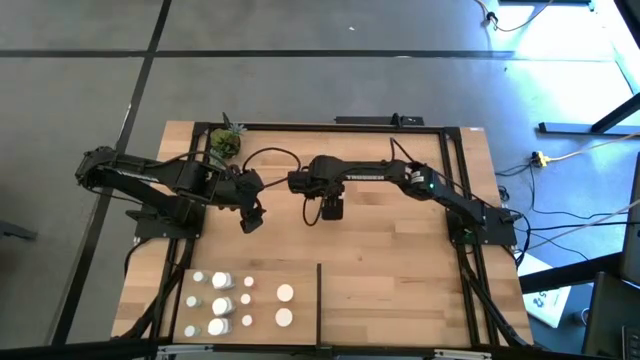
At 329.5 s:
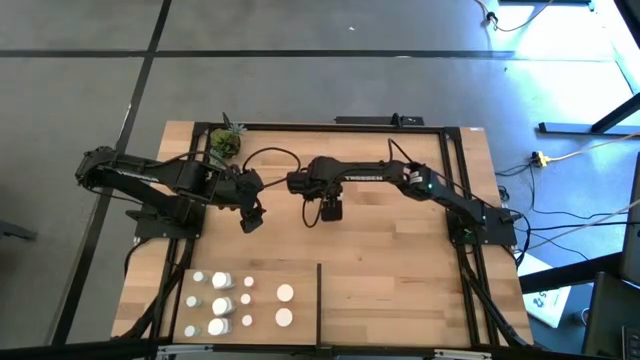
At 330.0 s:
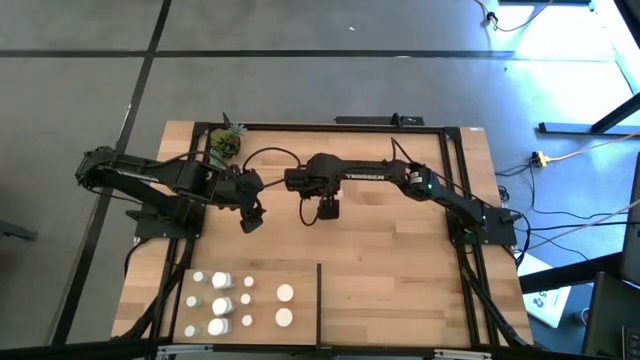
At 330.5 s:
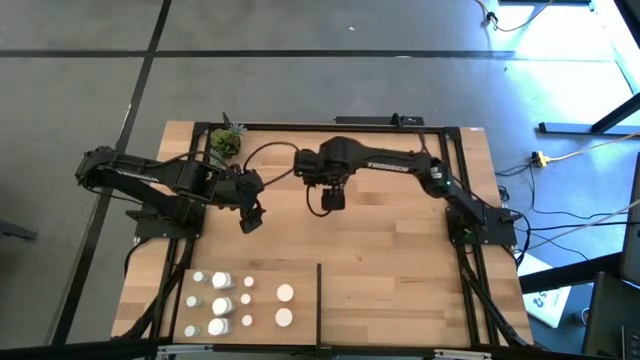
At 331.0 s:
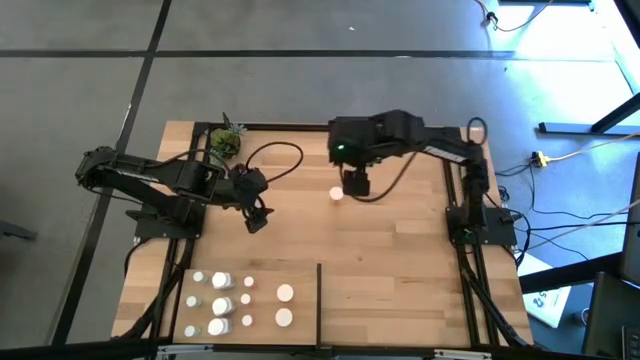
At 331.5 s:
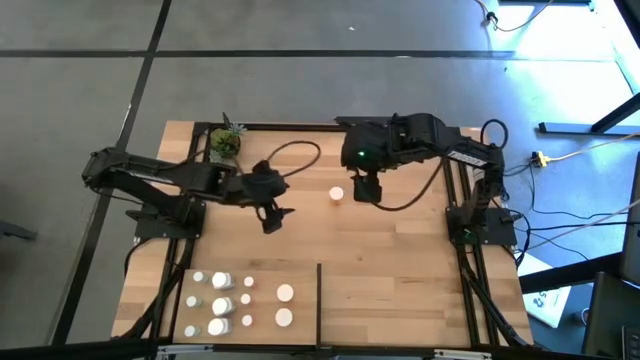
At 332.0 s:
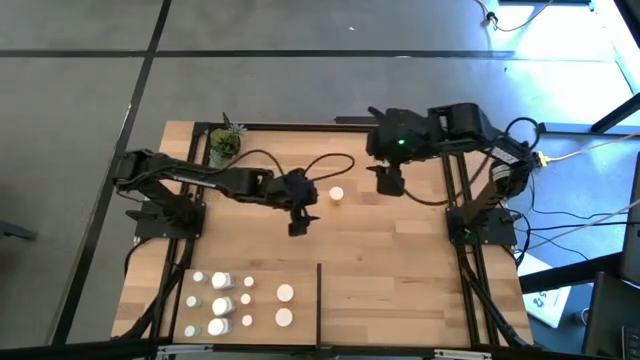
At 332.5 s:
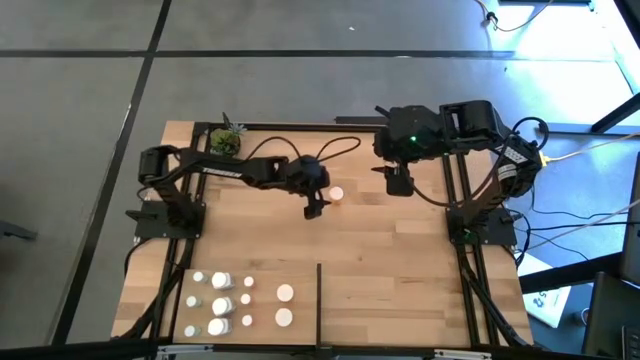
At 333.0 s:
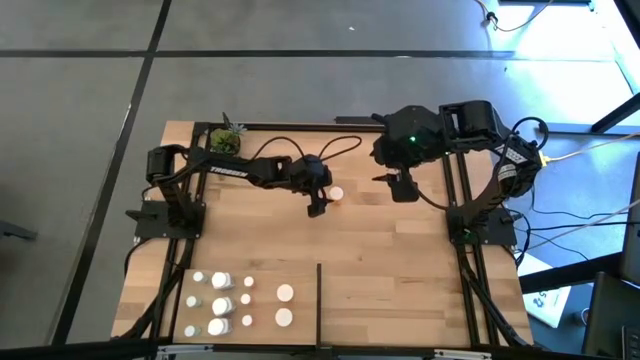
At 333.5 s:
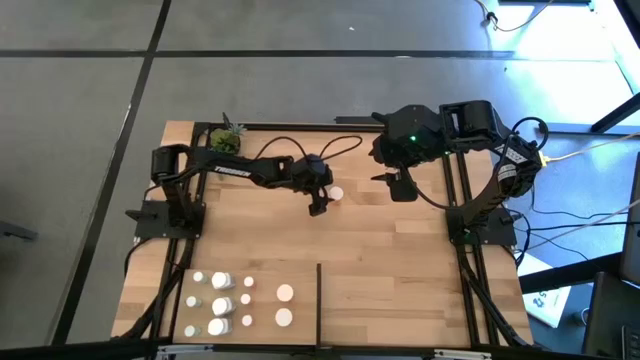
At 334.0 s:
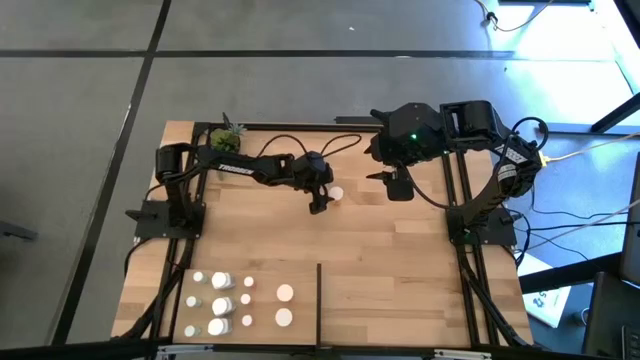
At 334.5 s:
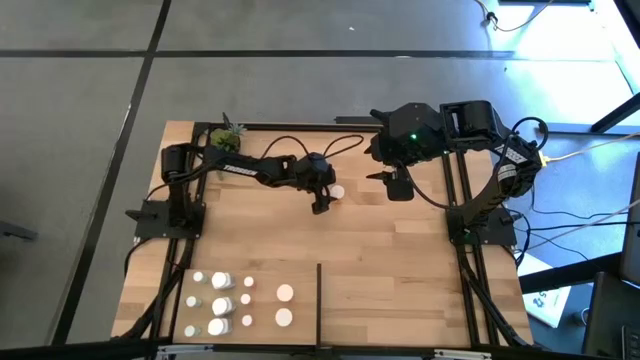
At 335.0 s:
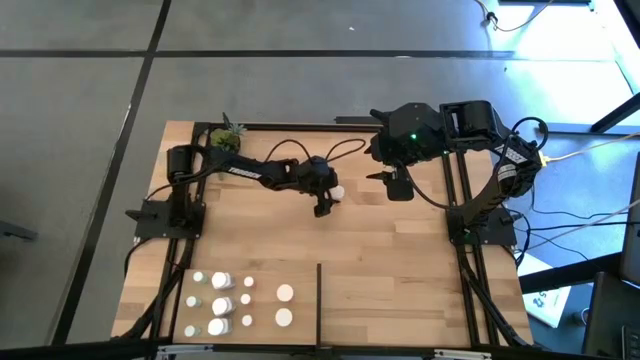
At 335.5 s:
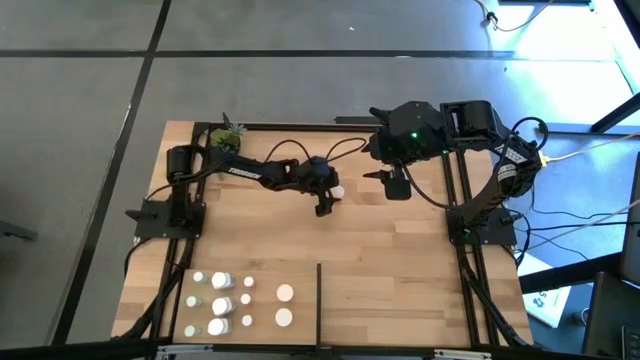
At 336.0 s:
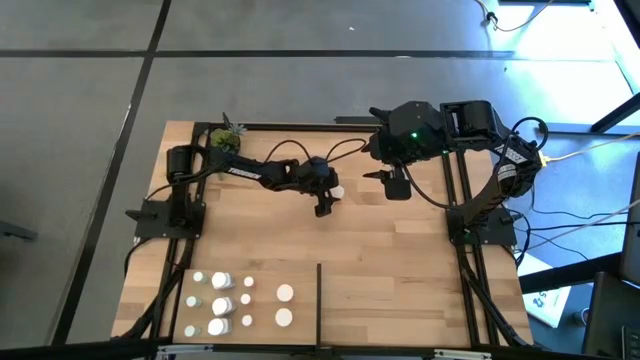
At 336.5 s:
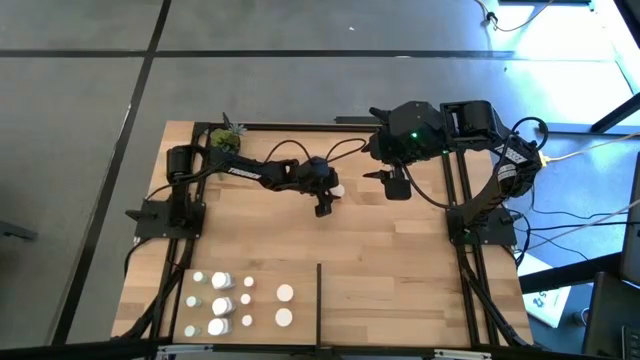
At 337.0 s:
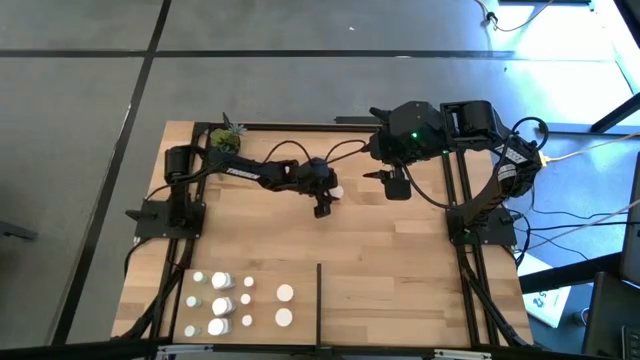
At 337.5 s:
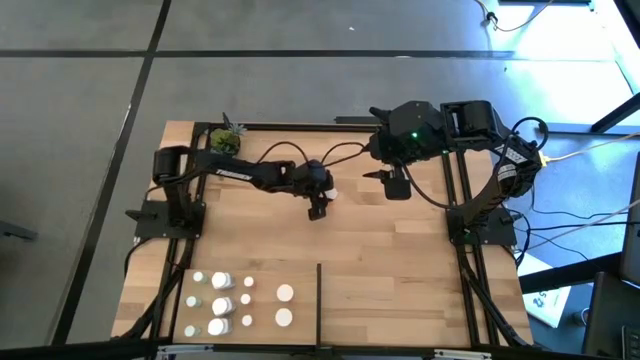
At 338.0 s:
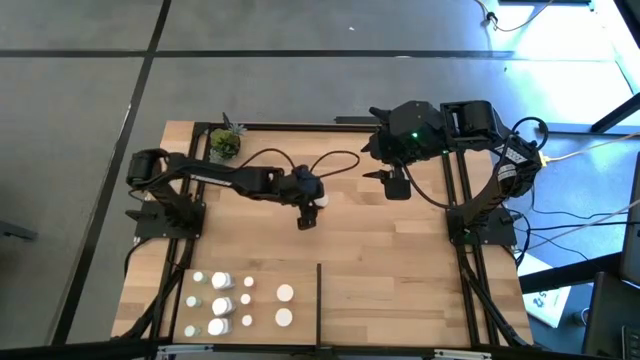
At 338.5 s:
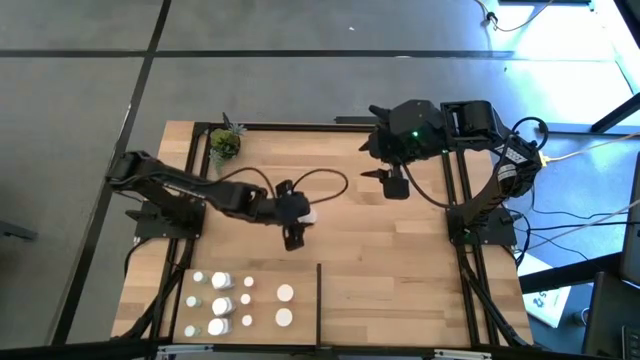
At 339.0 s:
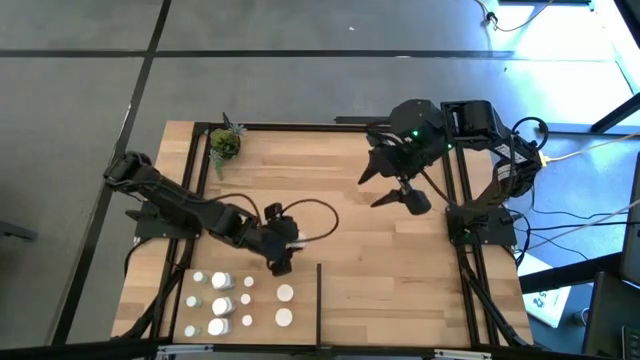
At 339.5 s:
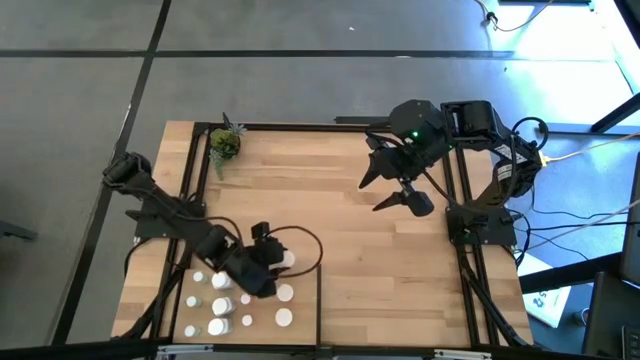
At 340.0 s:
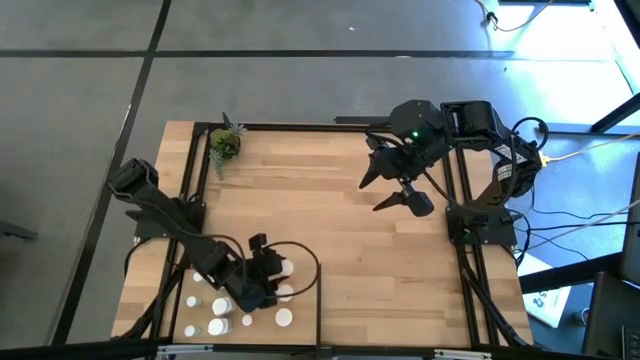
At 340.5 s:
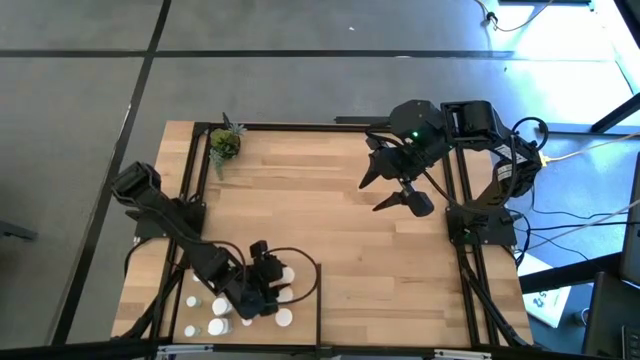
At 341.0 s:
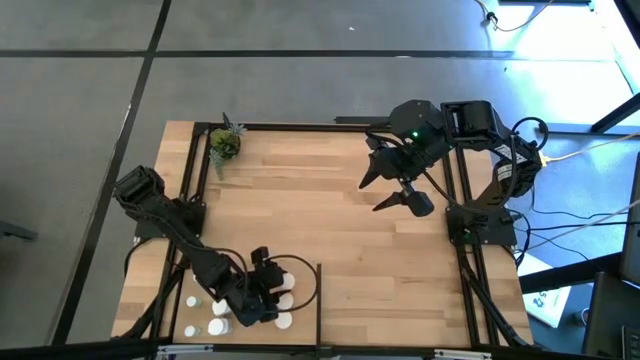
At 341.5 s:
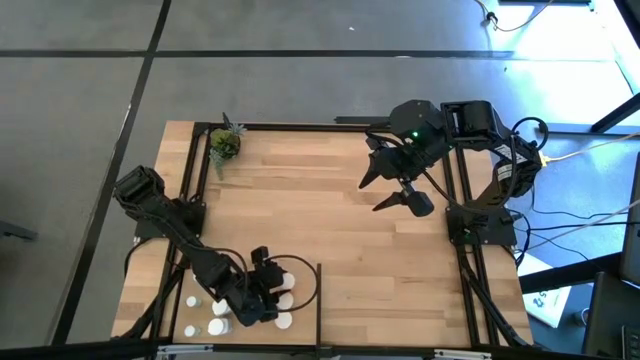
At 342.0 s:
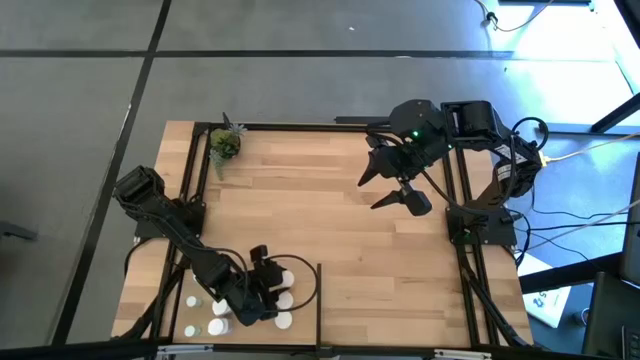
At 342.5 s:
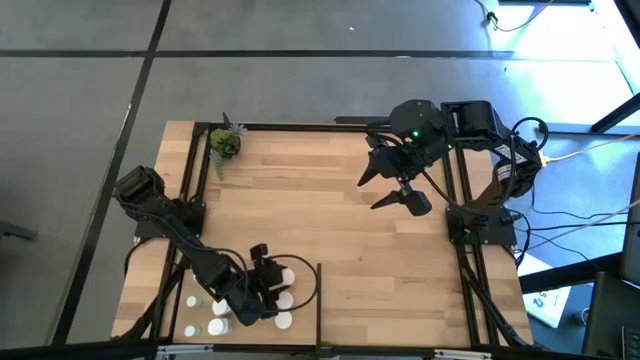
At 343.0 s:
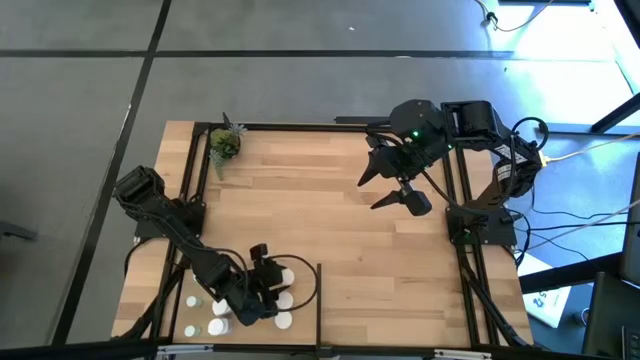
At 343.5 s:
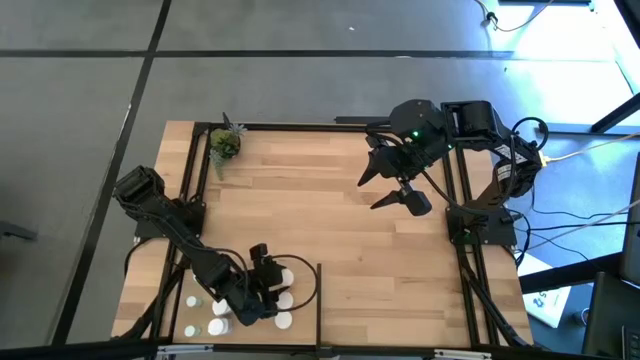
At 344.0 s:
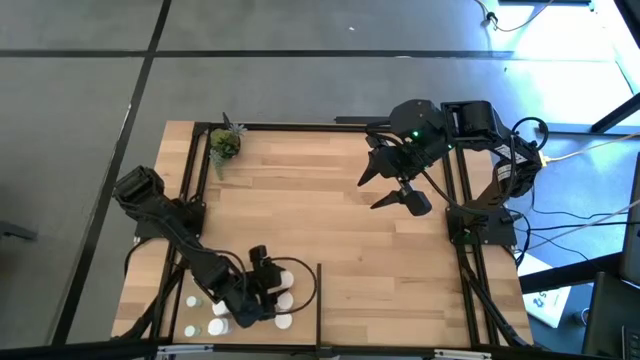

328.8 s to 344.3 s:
Task: Pick and place medicine bottles onto shelf by color
Put the orange pill bottle on the shelf aligned with the other orange pill bottle

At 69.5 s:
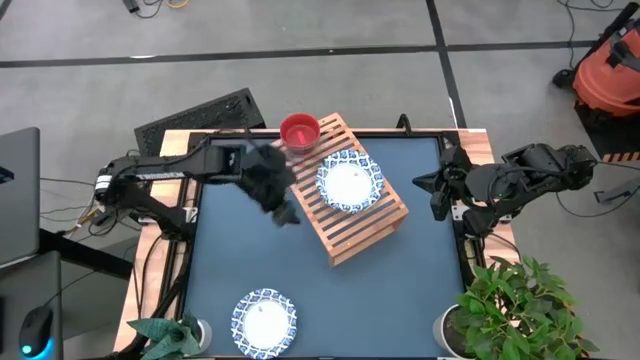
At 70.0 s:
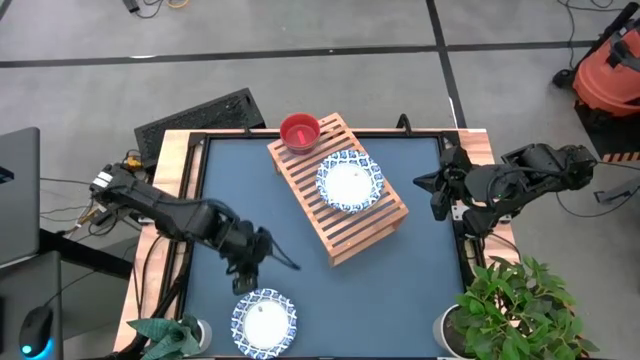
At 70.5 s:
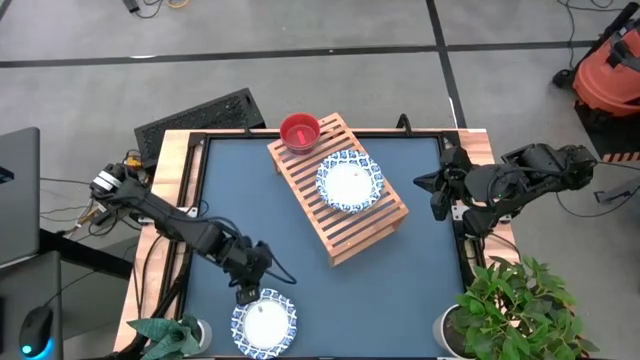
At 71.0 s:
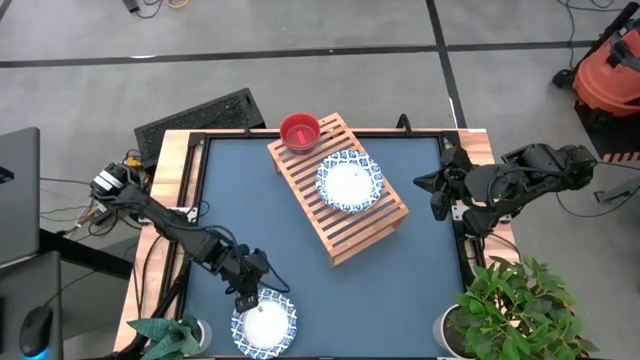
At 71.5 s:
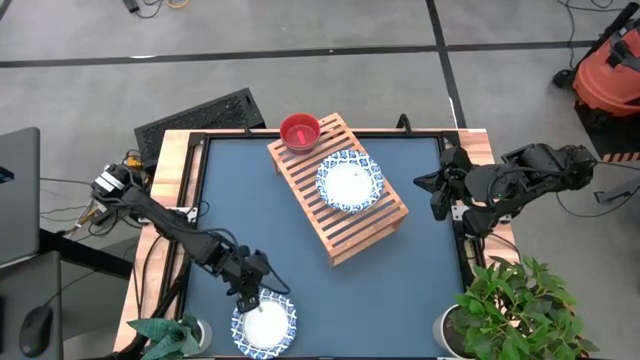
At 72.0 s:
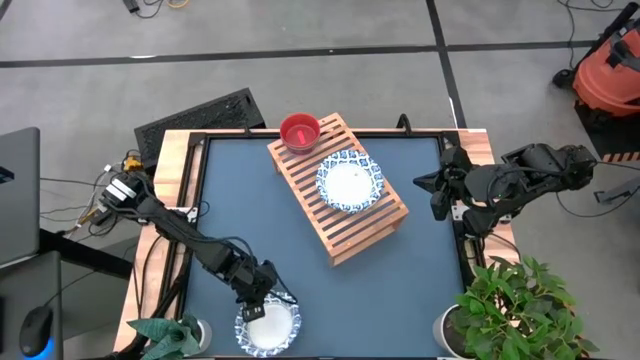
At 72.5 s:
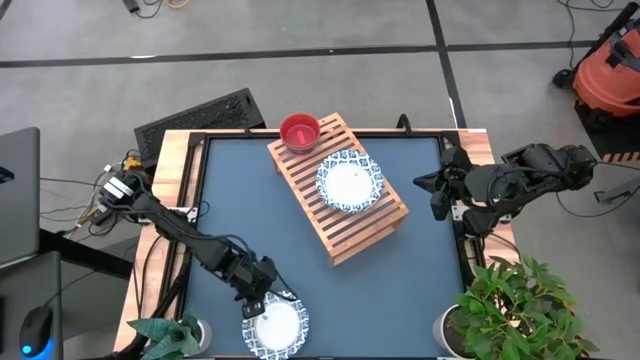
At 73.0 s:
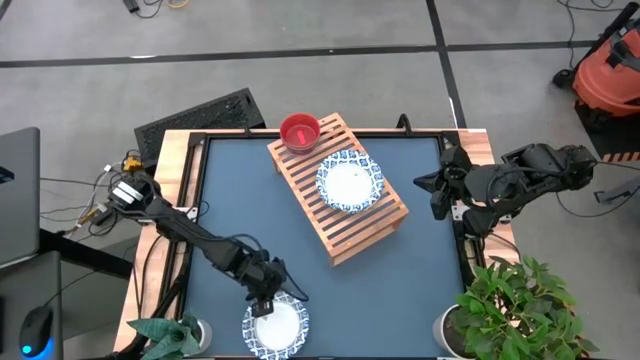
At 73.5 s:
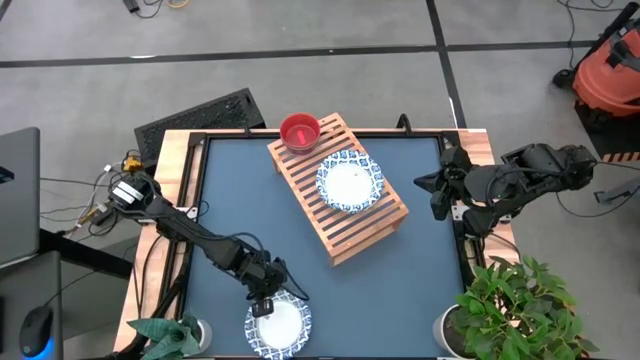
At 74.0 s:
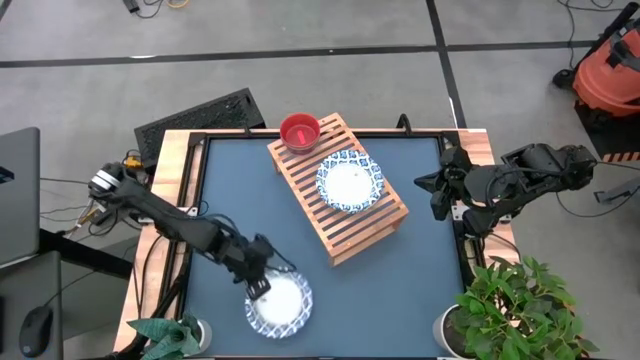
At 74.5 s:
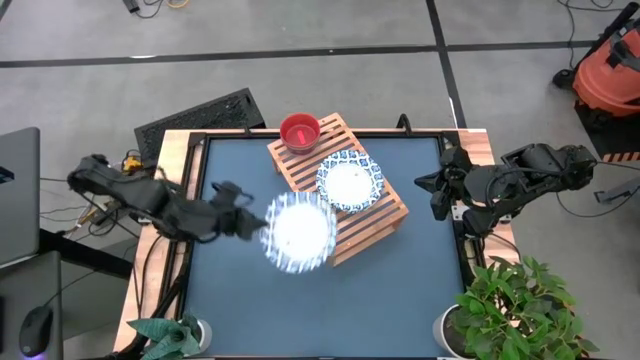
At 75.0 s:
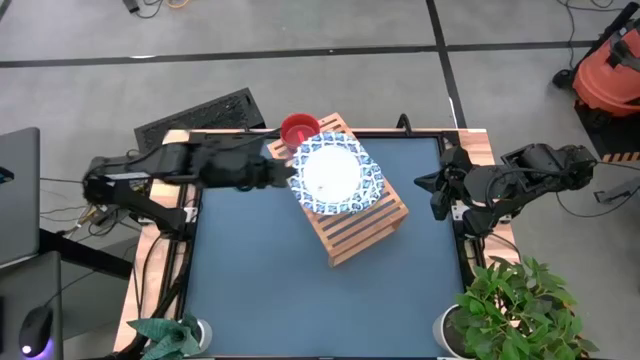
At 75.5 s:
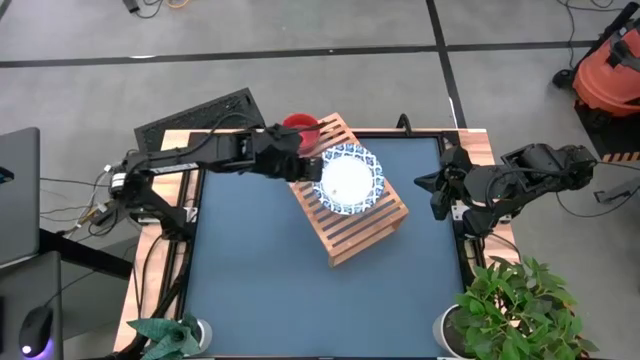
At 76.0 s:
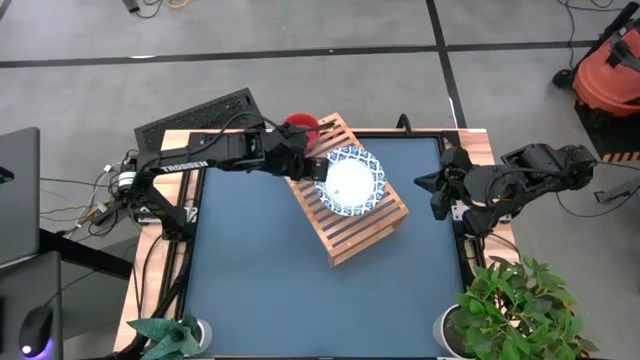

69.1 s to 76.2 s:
Task: Place and stack bowls onto a shelf
Stack the white bowl on top of the stacked white bowl on the shelf
